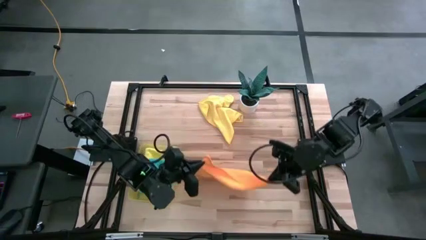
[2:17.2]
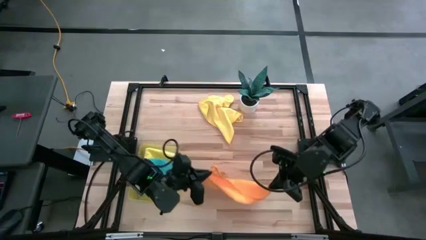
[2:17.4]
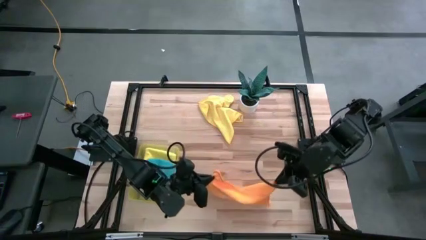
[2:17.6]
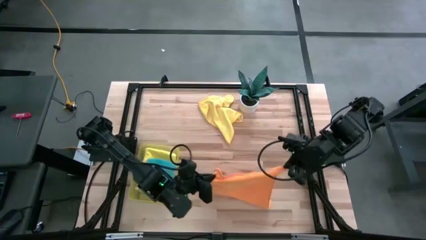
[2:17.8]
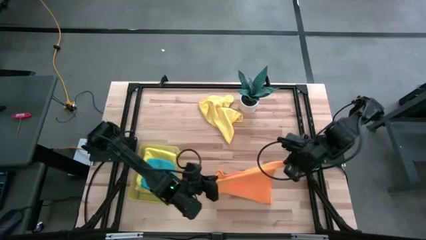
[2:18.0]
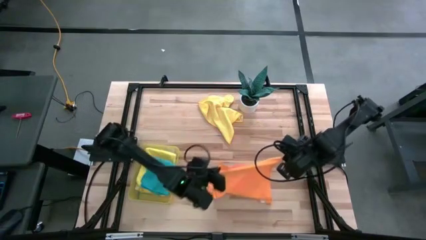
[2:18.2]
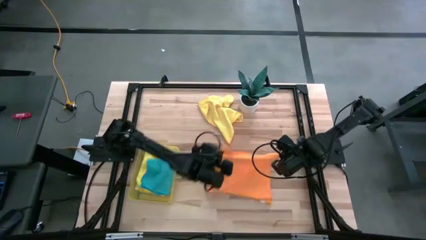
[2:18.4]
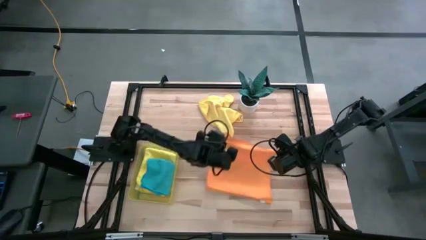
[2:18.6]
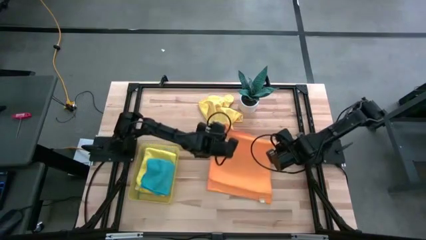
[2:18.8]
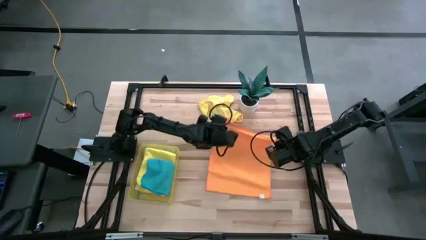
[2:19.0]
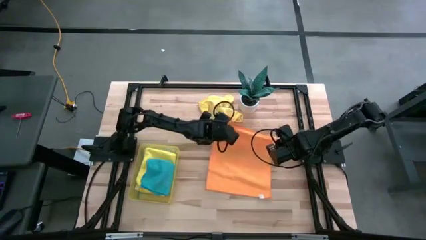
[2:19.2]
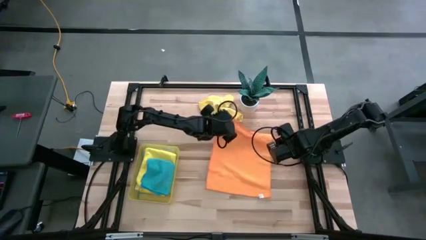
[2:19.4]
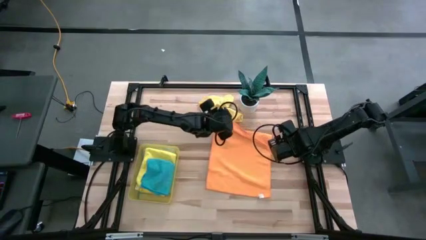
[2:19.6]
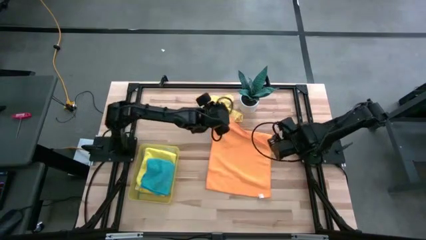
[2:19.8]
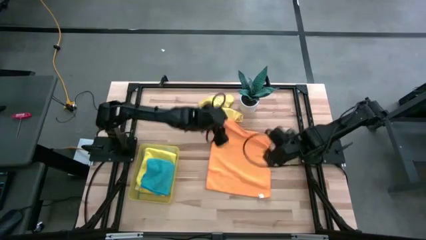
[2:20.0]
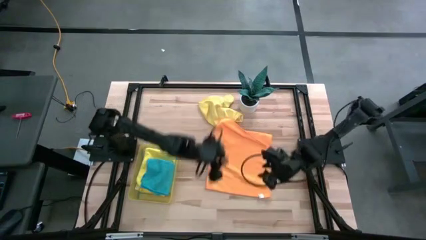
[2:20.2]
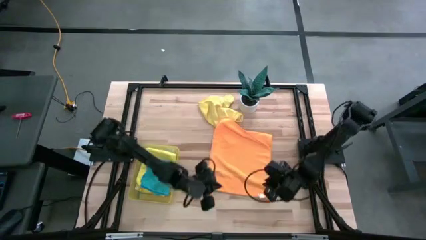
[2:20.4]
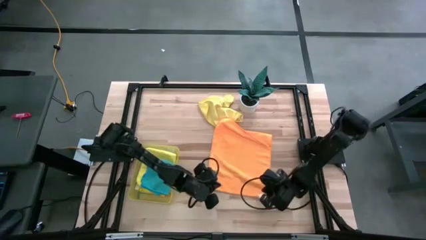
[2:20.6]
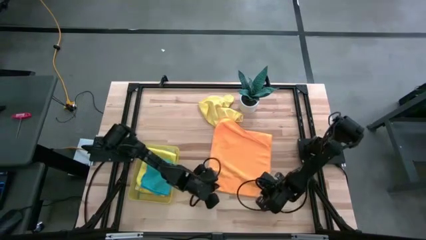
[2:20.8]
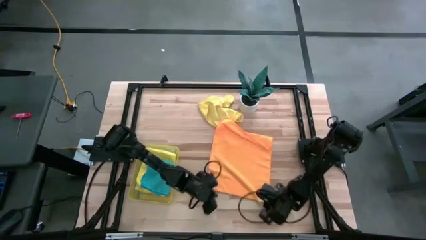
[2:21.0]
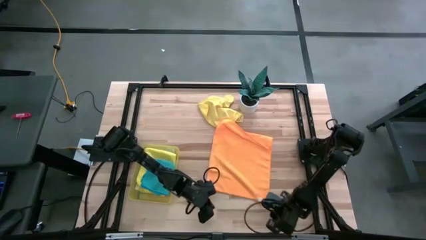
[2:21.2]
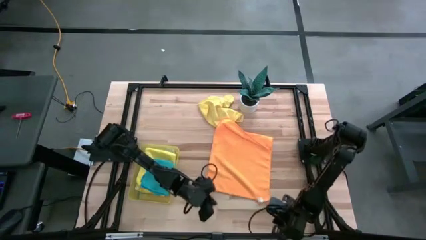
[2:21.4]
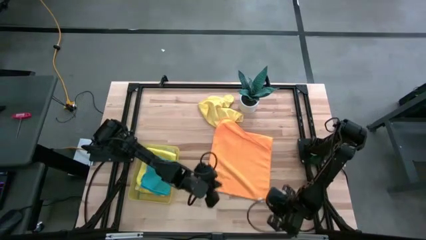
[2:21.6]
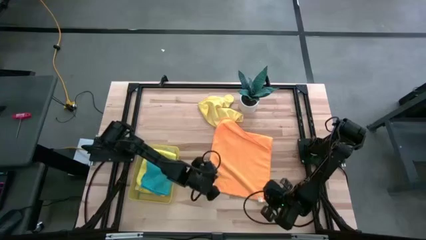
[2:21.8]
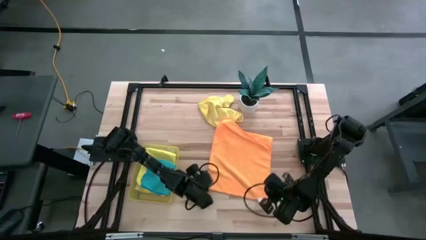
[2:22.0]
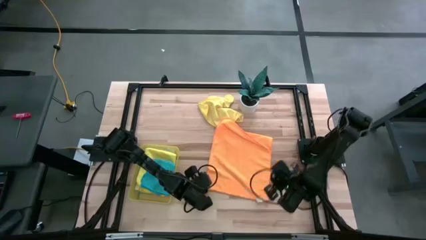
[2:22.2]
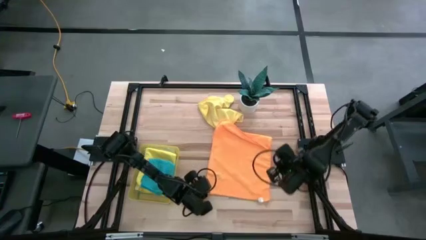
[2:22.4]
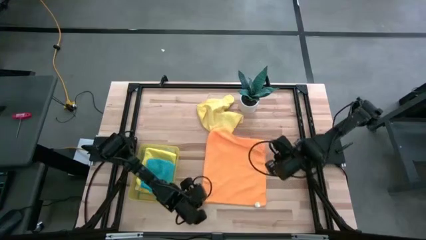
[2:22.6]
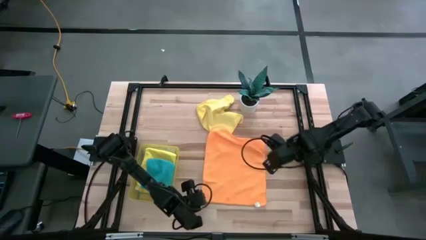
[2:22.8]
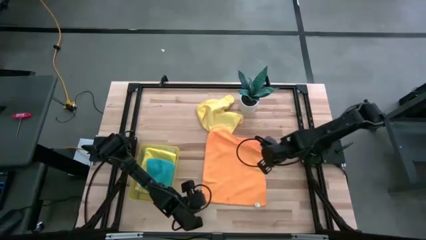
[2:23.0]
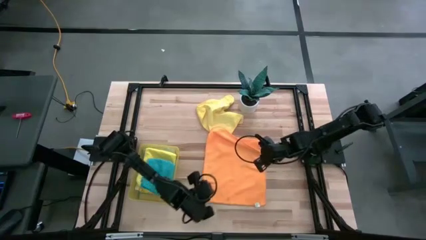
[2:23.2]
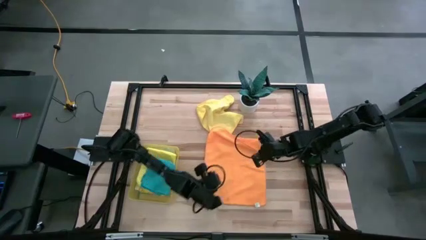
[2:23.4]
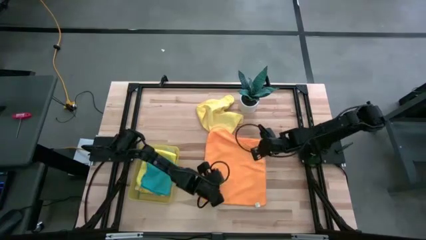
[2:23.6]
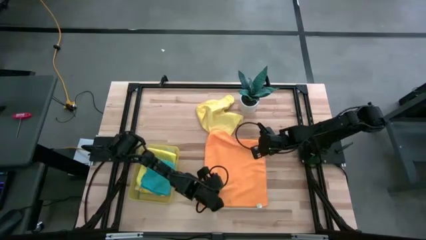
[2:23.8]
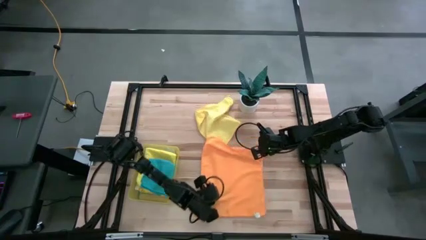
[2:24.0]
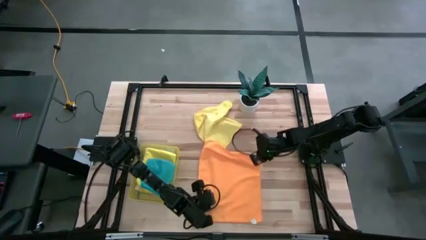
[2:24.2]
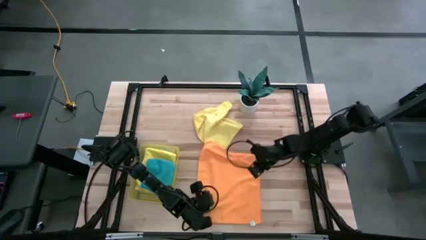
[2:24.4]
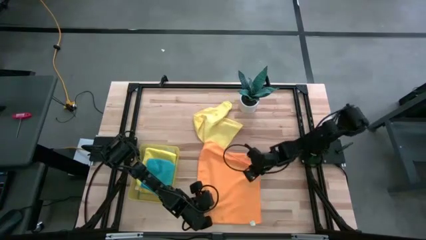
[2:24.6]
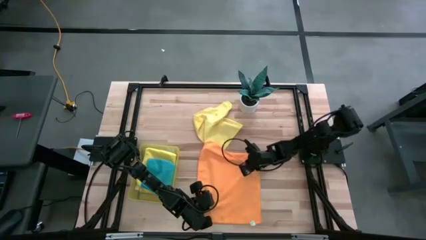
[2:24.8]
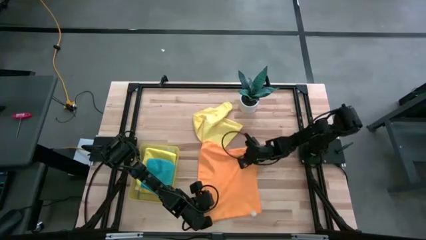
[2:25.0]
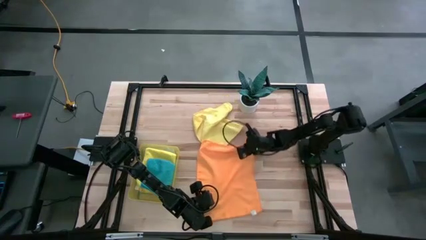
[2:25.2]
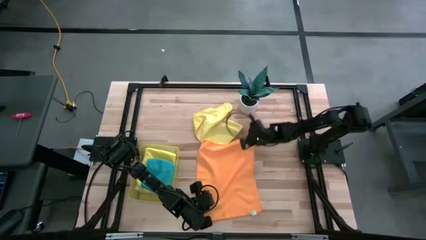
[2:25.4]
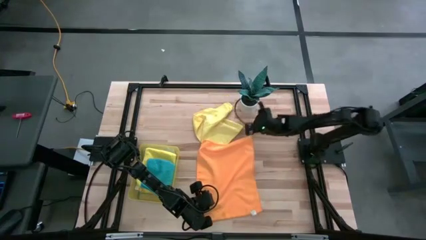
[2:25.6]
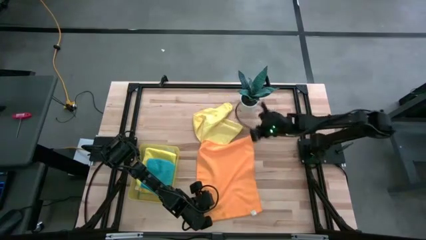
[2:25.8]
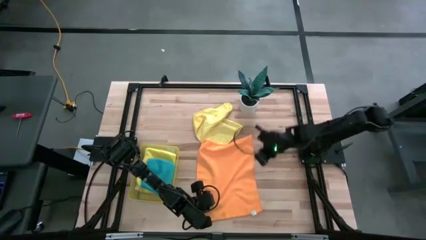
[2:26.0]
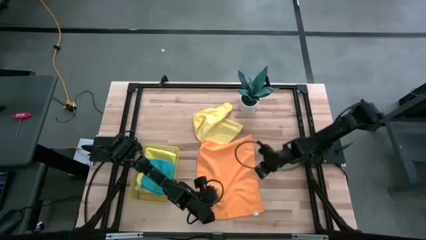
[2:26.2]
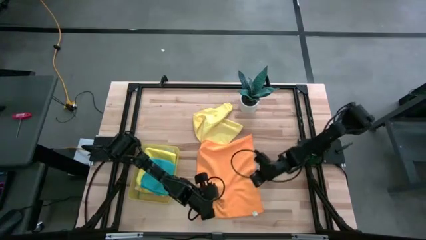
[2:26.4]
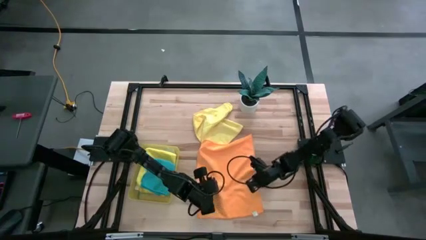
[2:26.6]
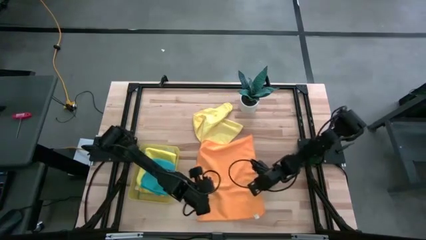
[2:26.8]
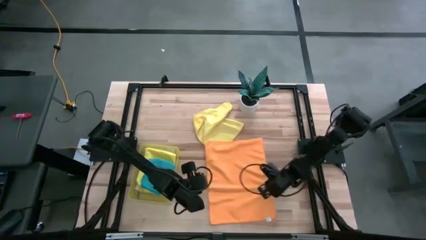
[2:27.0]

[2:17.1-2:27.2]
Task: Fold microfiber towels
Move the orange microfiber cloth to the bottom center of the table

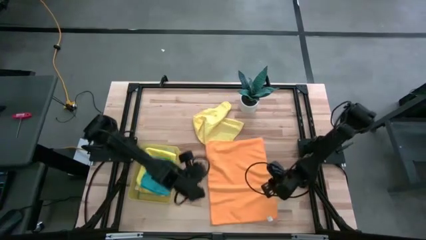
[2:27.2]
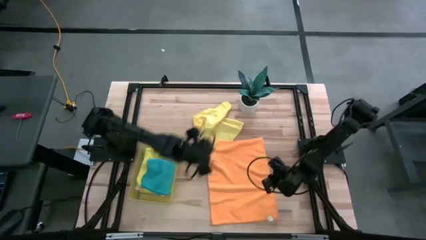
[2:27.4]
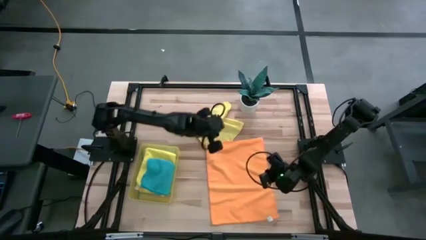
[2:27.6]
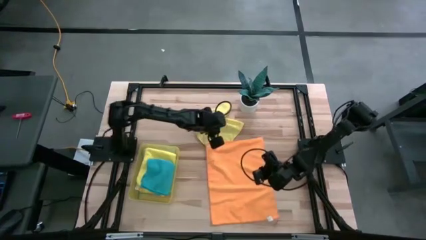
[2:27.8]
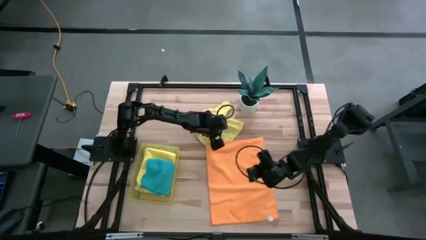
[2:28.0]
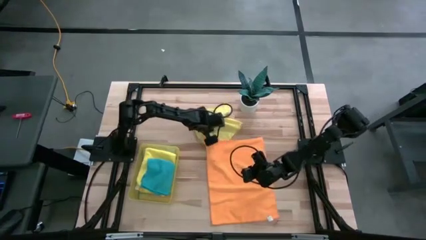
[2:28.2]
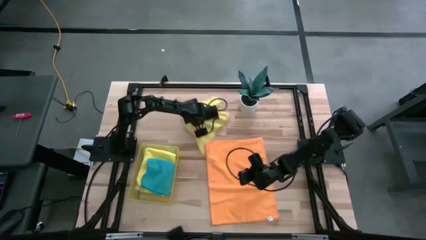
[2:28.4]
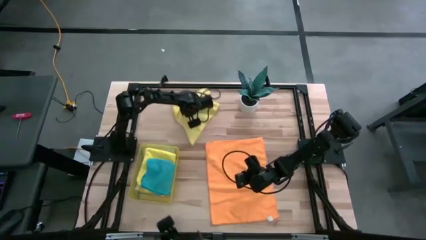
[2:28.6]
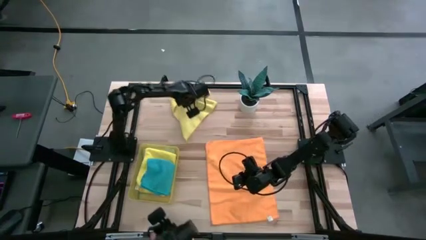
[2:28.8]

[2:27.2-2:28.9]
Adjust the yellow microfiber cloth
